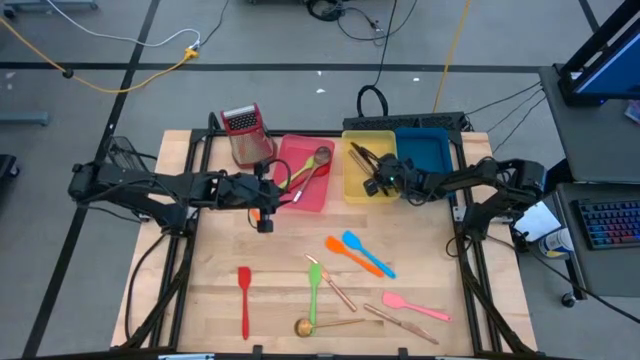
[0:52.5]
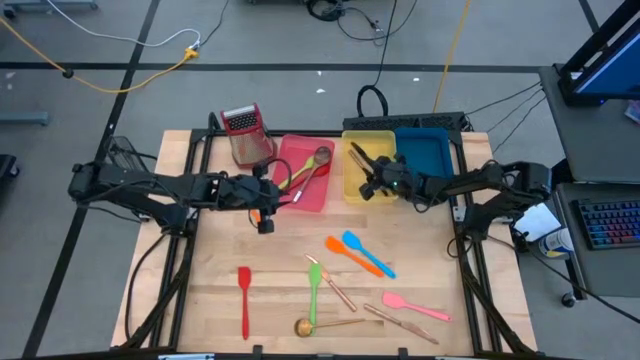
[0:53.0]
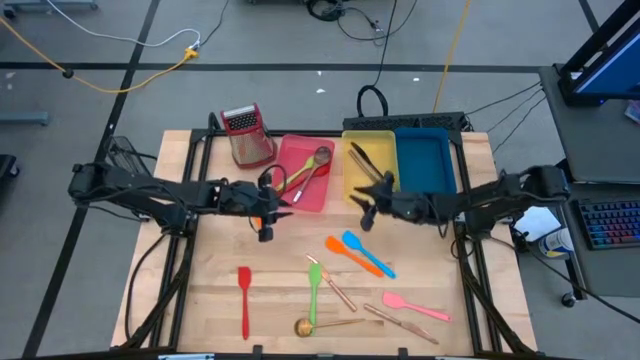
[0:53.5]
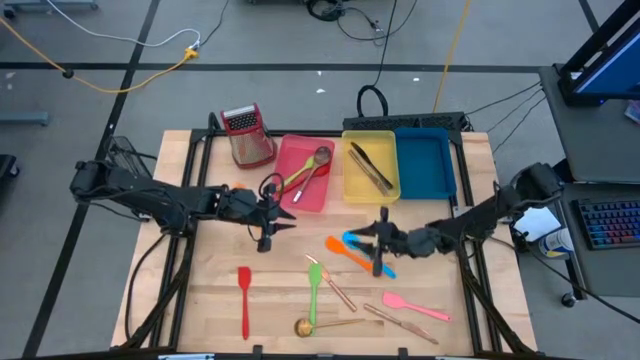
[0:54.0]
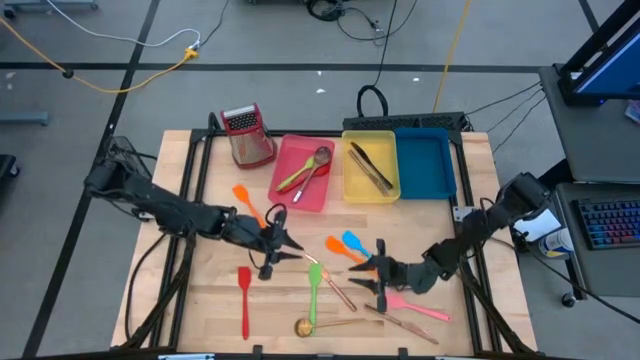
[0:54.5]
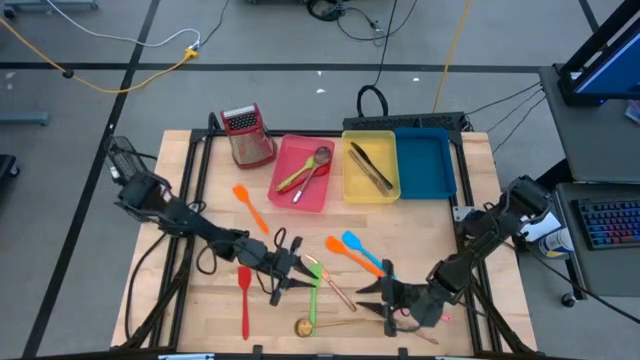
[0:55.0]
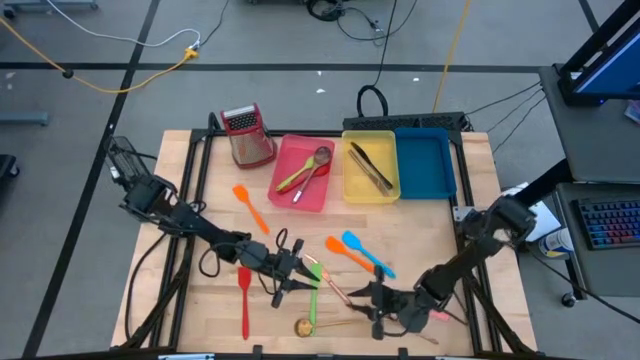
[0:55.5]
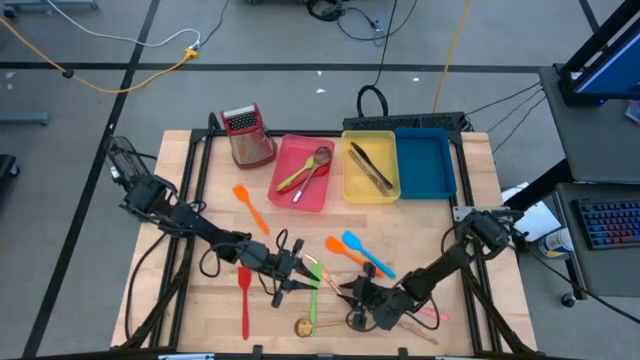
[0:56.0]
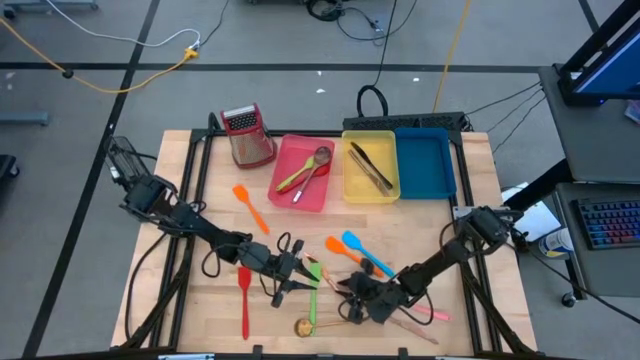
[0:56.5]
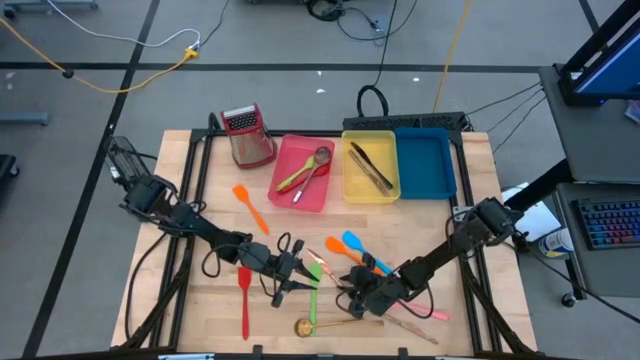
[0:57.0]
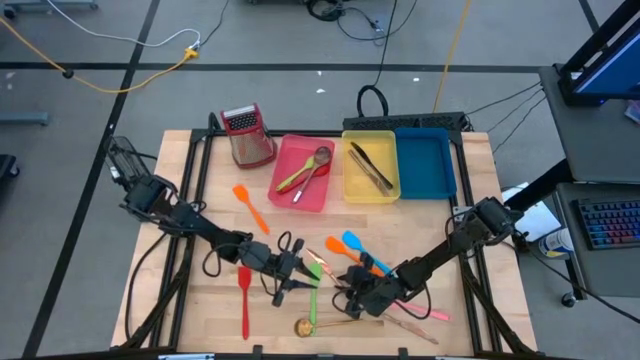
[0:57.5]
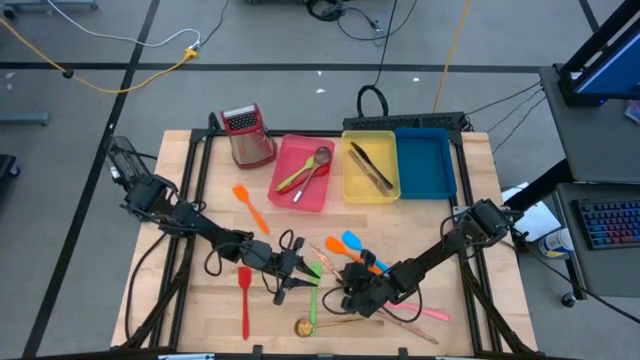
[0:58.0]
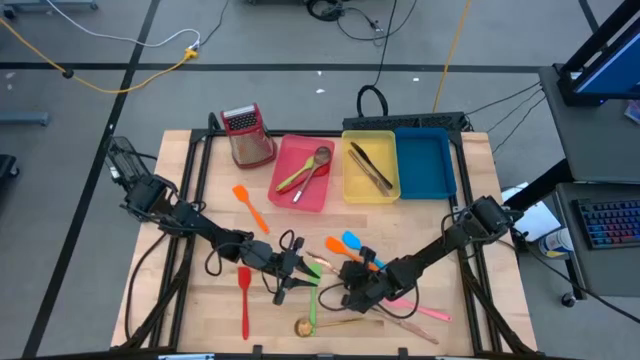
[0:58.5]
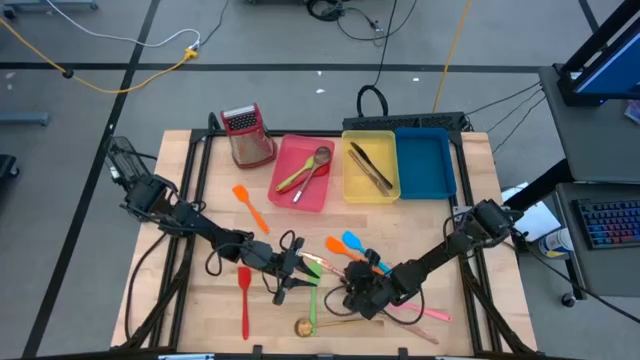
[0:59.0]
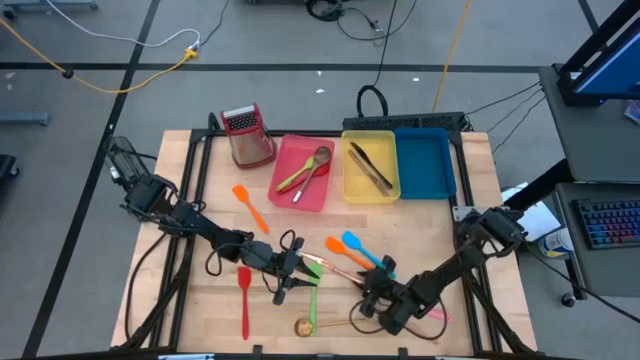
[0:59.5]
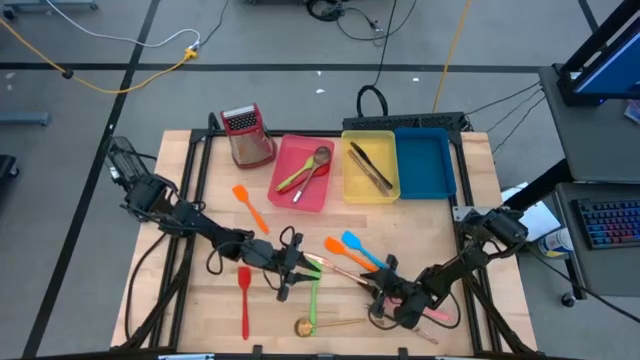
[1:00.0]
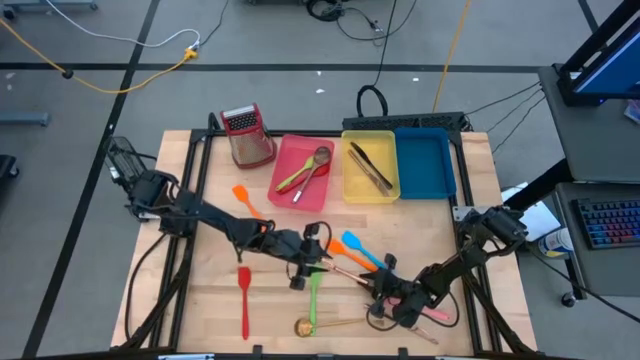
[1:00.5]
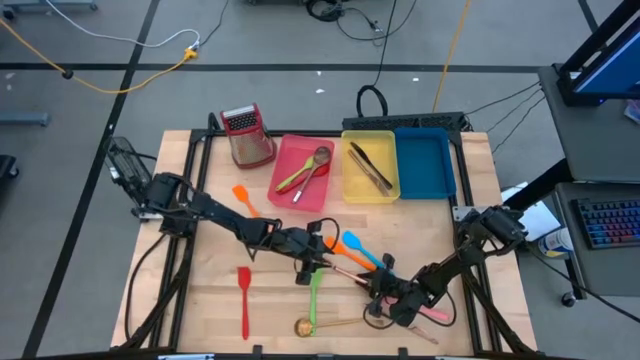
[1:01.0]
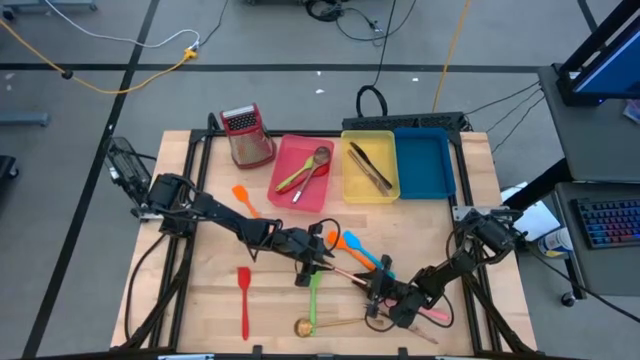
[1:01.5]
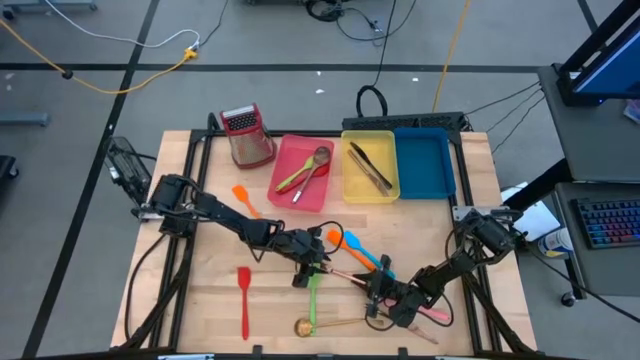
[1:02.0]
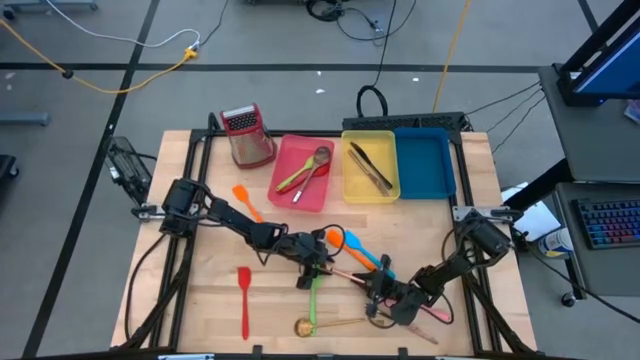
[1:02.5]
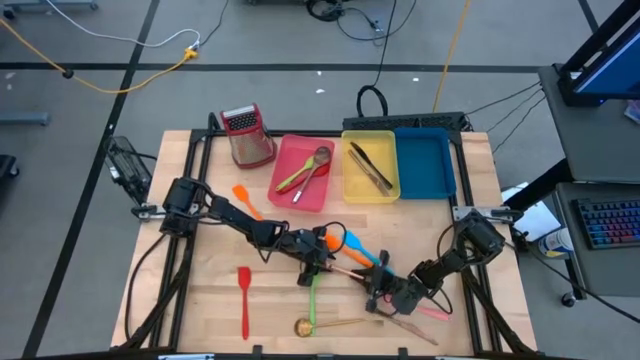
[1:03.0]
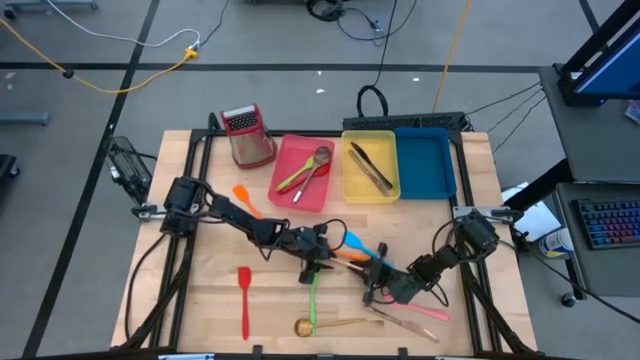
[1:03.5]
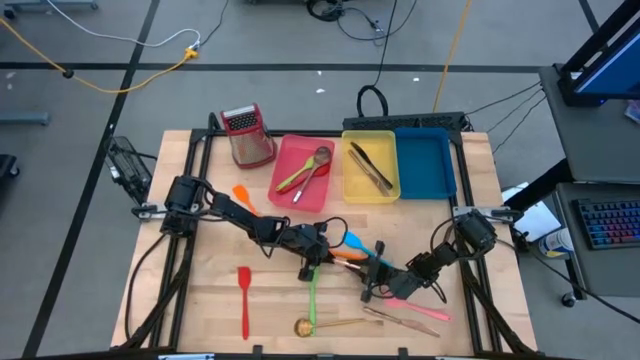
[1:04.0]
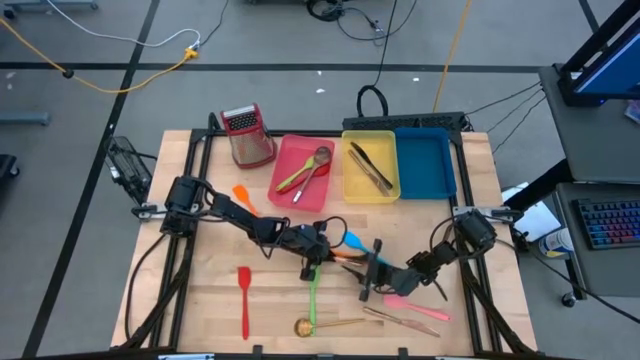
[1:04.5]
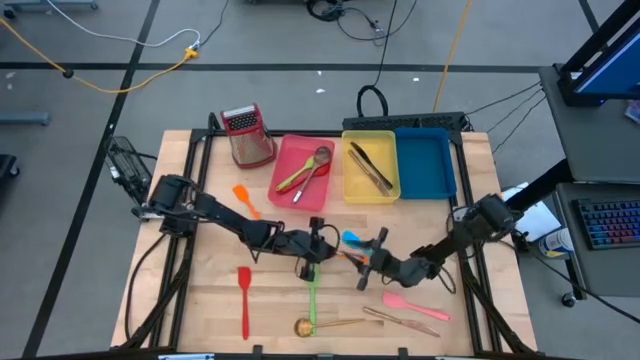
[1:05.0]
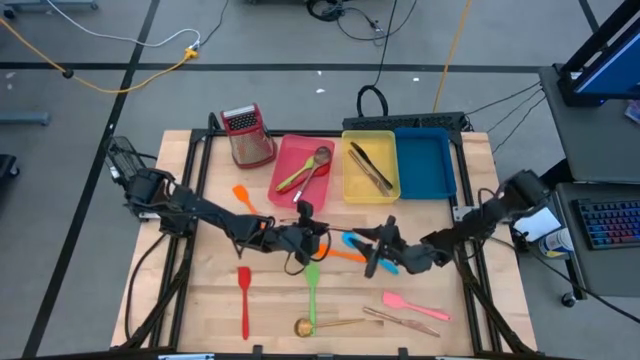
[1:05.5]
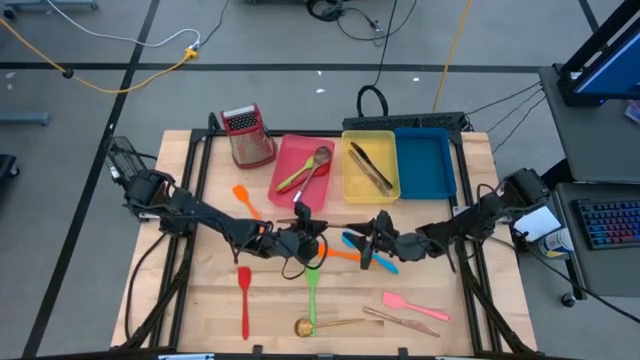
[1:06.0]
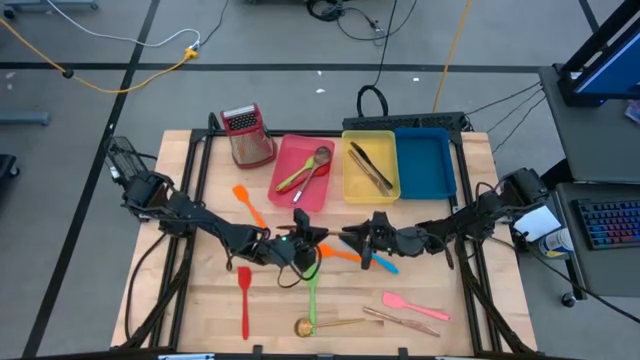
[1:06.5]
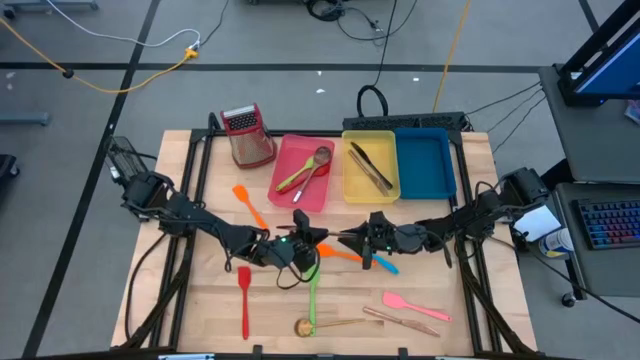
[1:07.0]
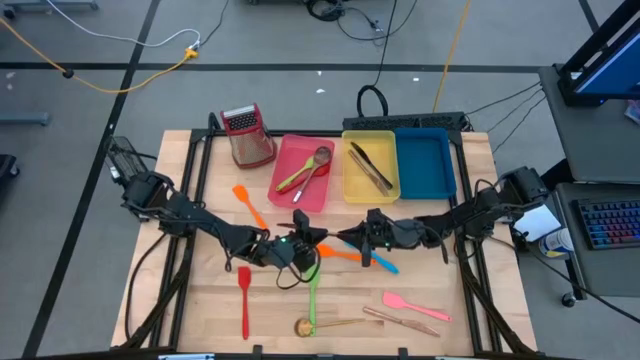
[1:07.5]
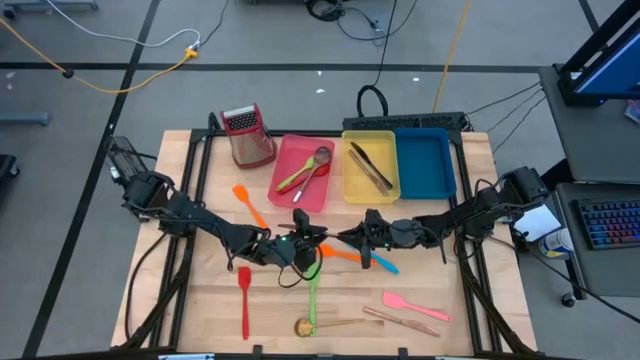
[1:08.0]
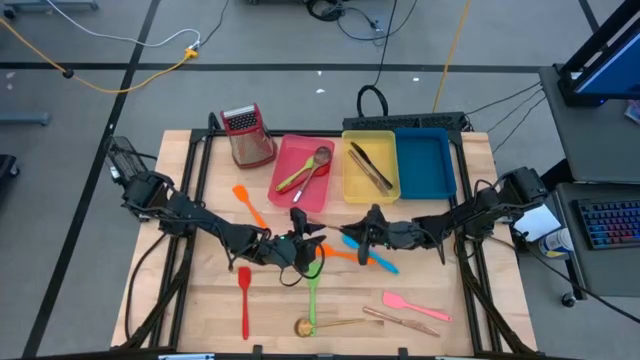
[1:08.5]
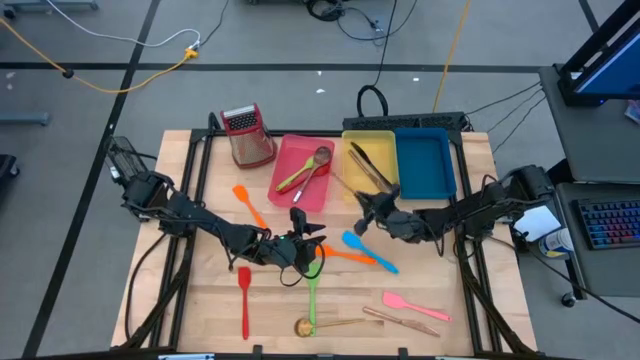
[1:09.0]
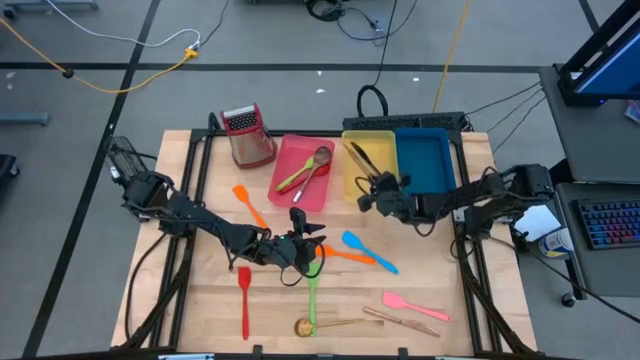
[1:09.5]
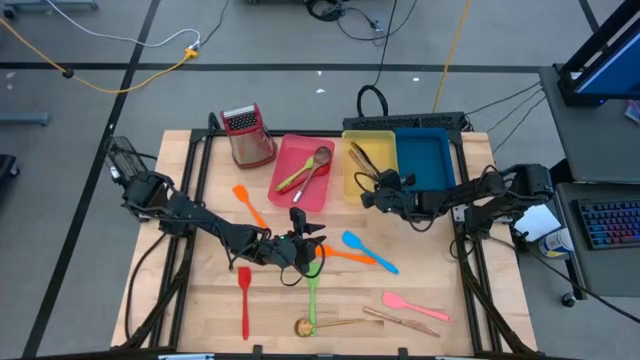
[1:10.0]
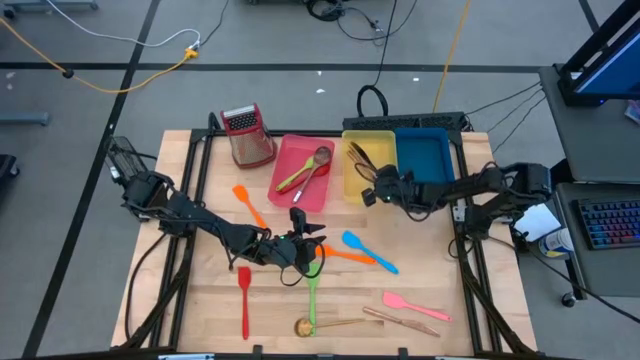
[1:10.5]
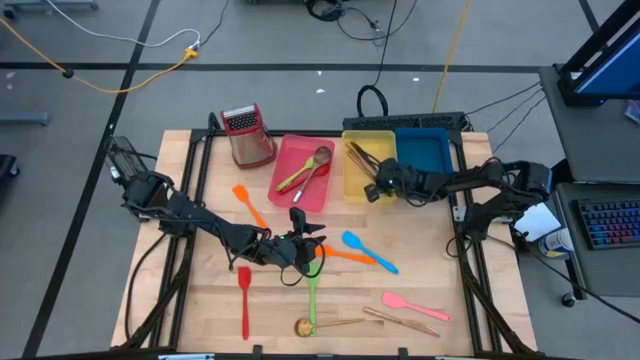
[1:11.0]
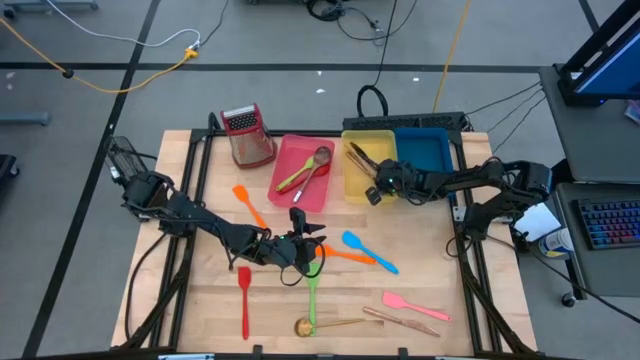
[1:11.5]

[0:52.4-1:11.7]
Task: Pick & Place Kitchen Items
Put the top gold table knife into the yellow bin

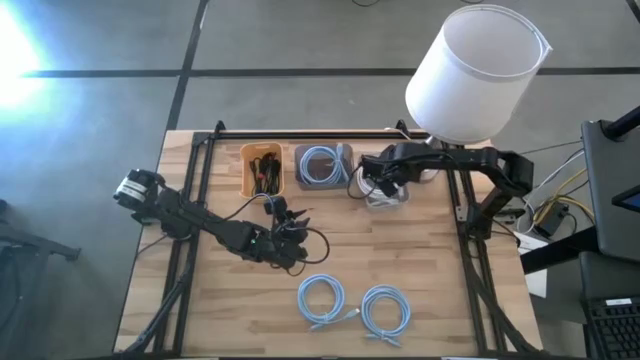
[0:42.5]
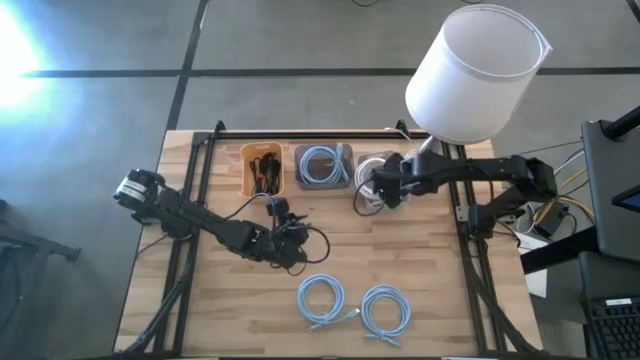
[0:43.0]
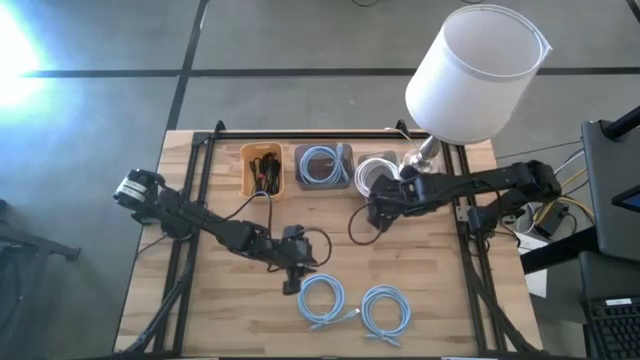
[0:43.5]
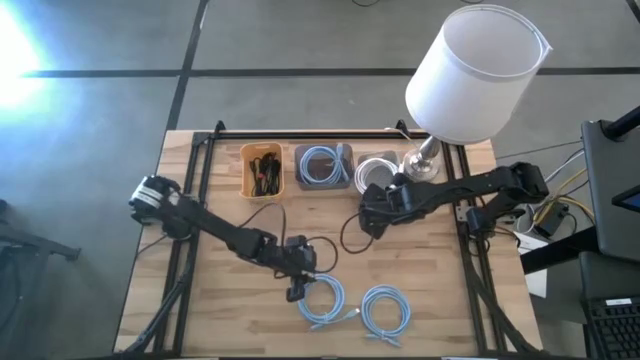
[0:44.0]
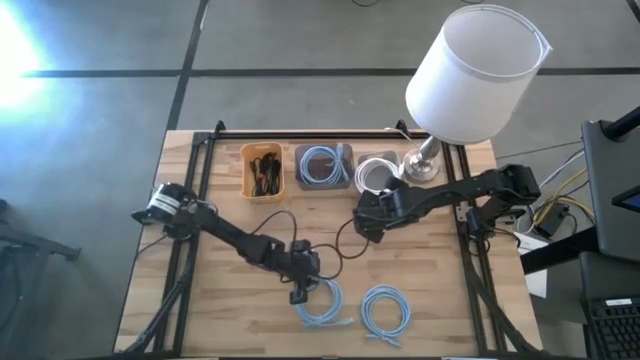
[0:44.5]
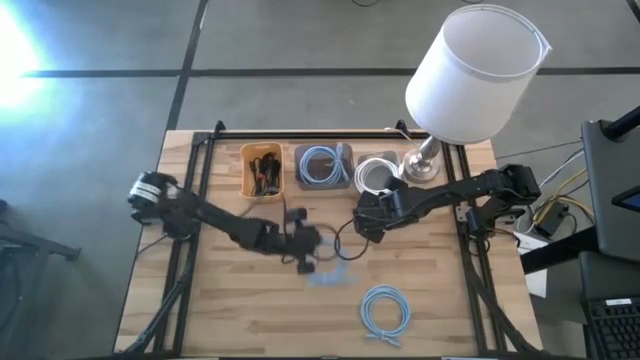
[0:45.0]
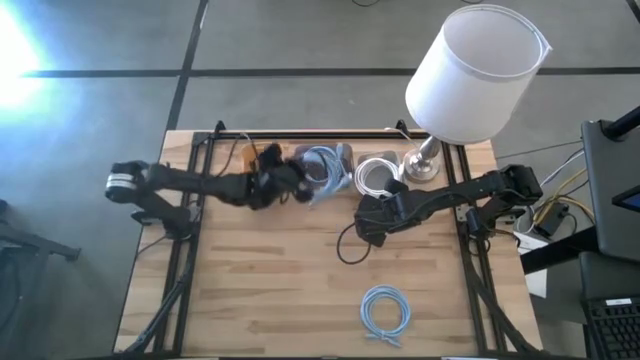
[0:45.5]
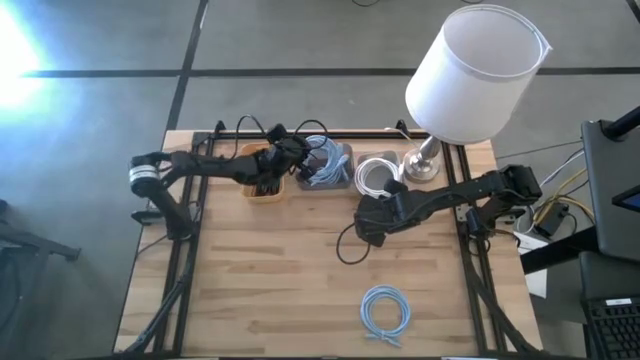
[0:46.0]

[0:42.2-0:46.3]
Task: Pick & Place USB Port
Put the left blue charger cable into the black bin
